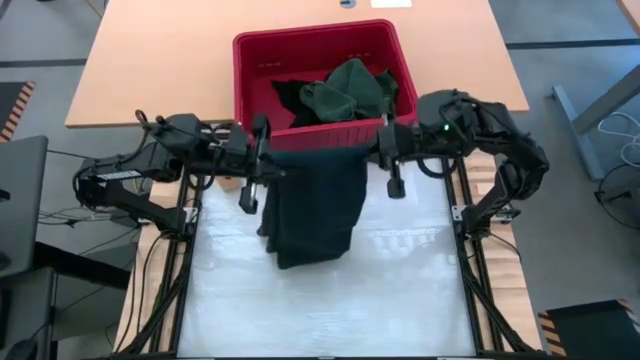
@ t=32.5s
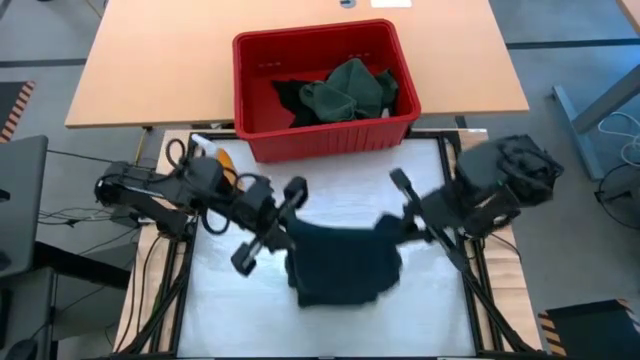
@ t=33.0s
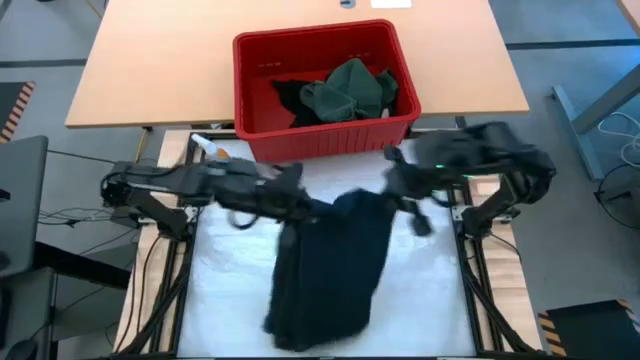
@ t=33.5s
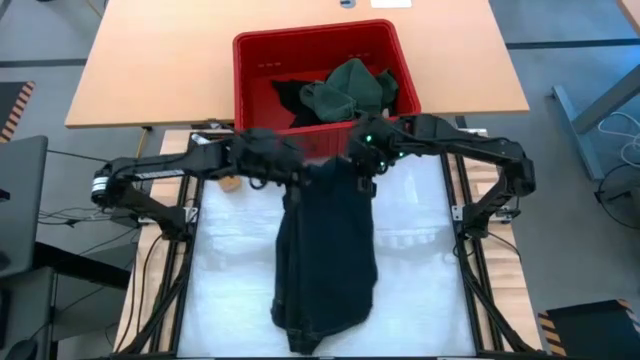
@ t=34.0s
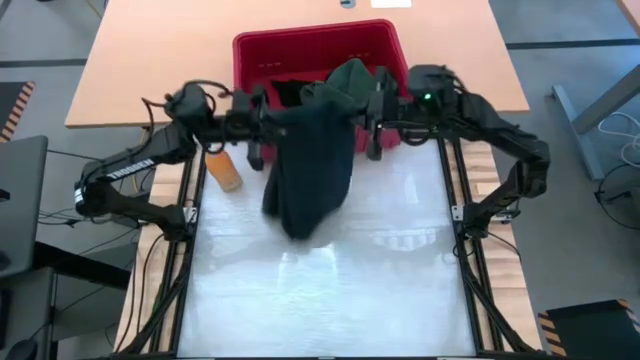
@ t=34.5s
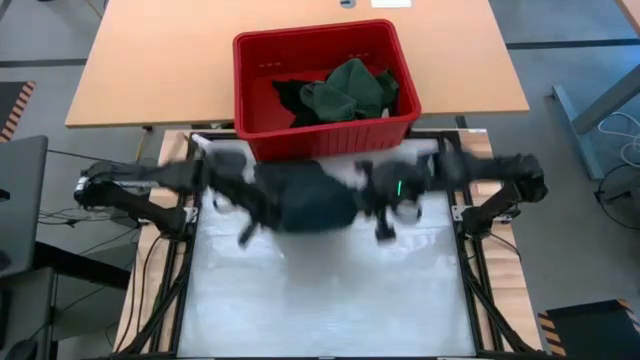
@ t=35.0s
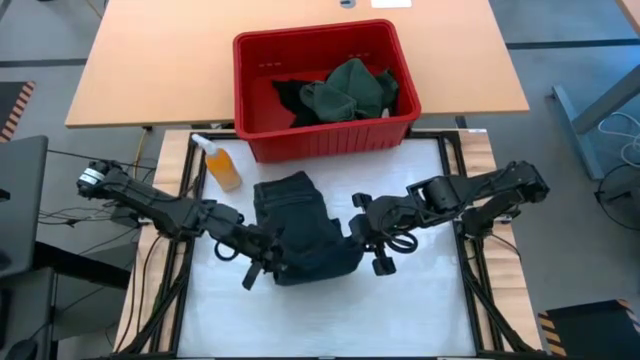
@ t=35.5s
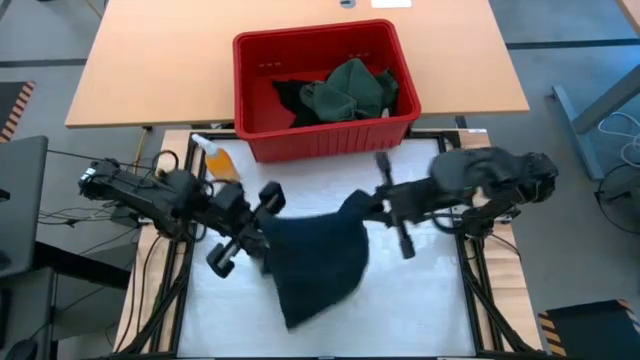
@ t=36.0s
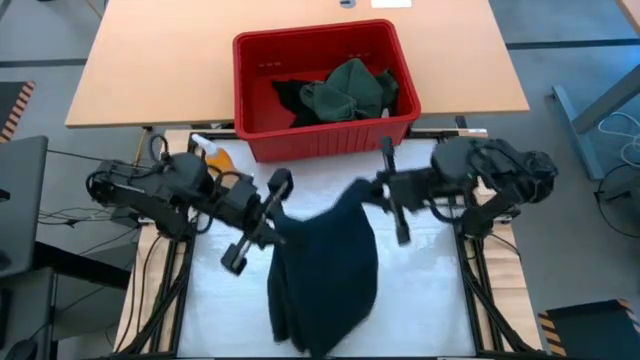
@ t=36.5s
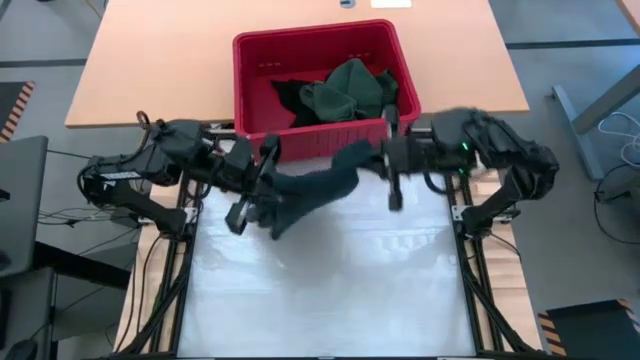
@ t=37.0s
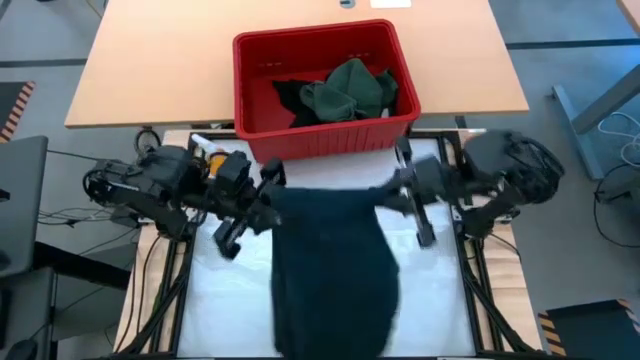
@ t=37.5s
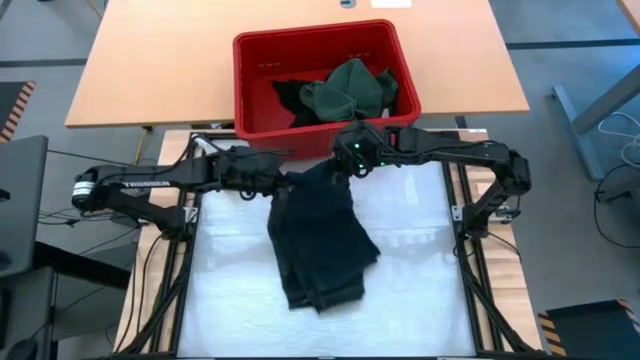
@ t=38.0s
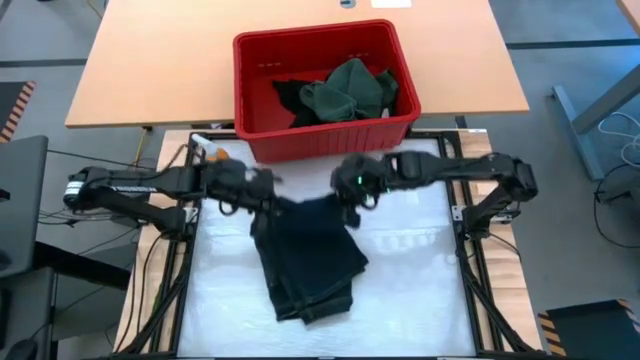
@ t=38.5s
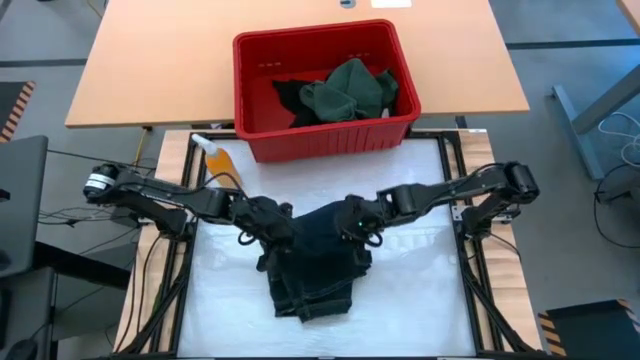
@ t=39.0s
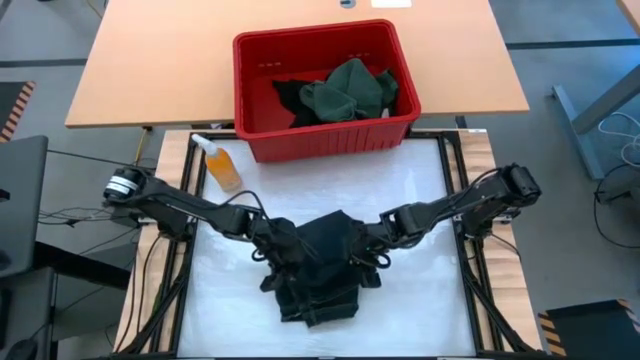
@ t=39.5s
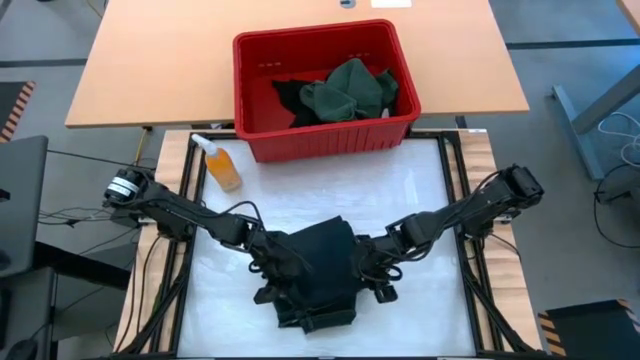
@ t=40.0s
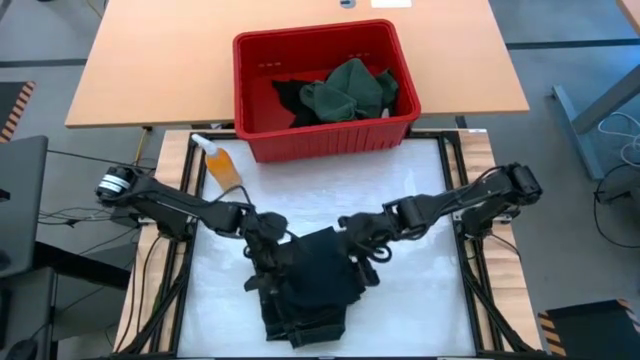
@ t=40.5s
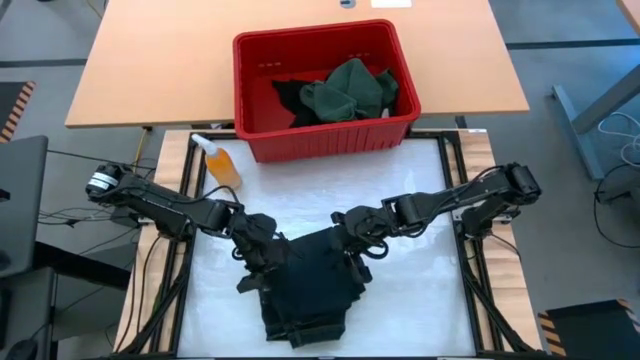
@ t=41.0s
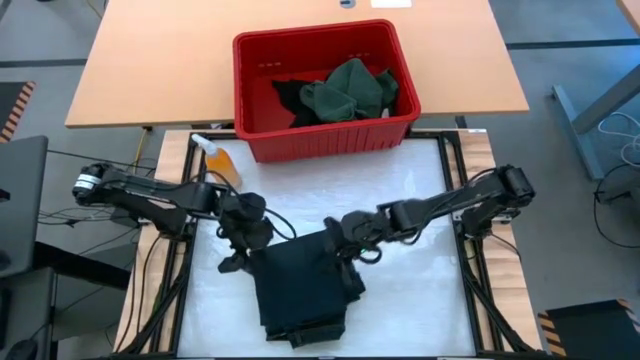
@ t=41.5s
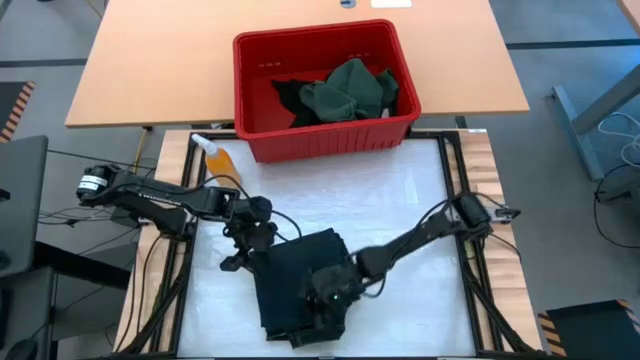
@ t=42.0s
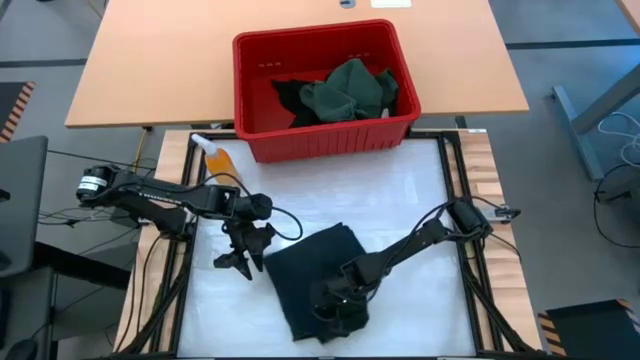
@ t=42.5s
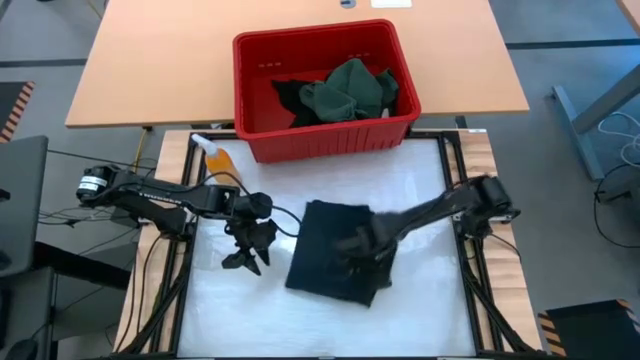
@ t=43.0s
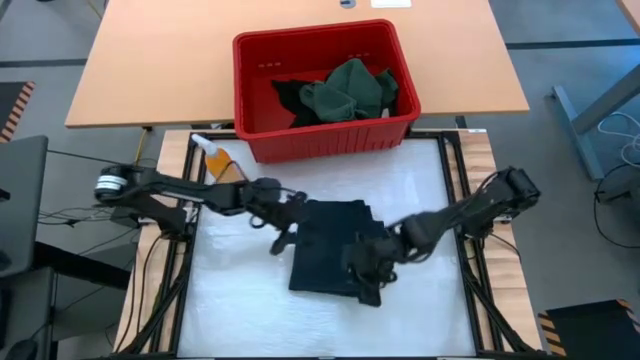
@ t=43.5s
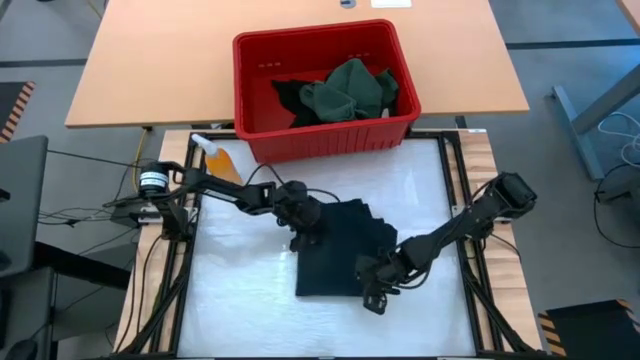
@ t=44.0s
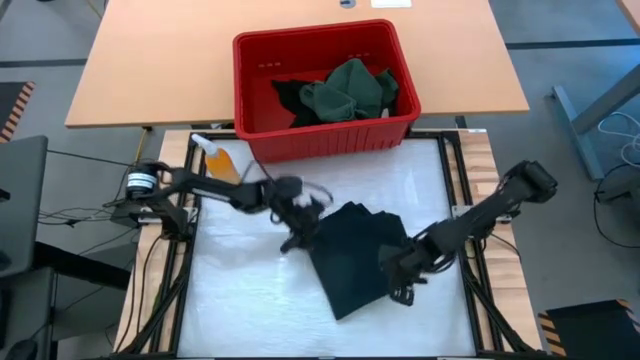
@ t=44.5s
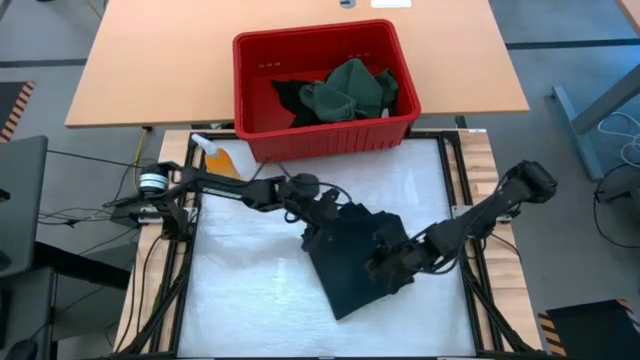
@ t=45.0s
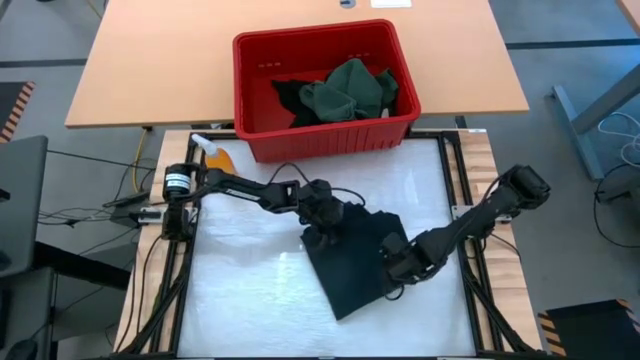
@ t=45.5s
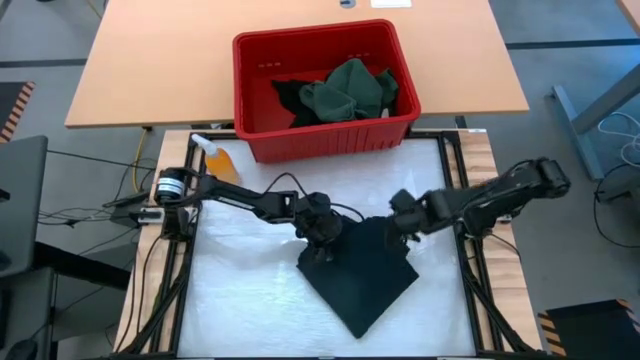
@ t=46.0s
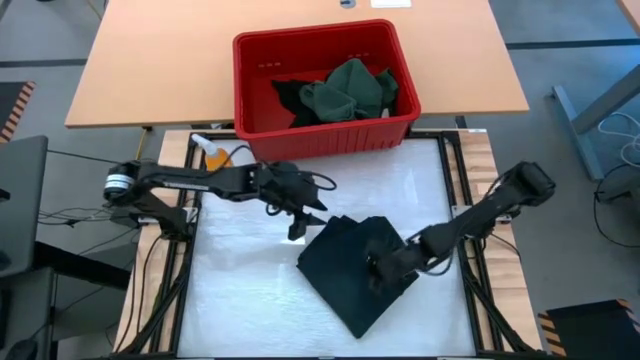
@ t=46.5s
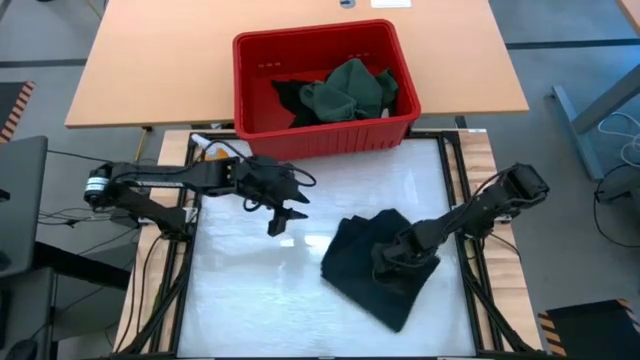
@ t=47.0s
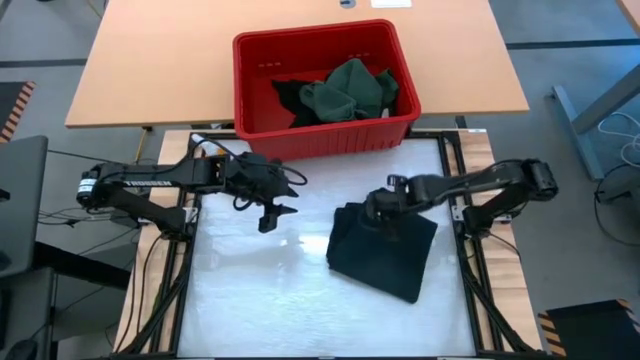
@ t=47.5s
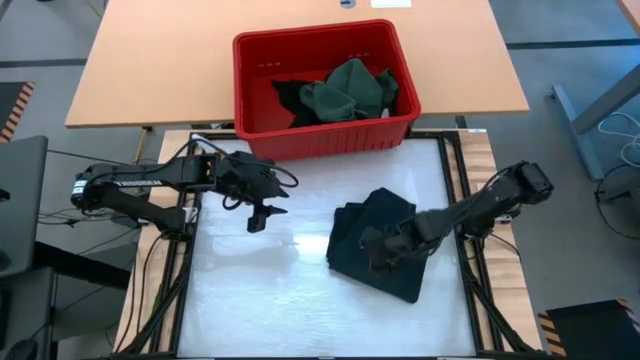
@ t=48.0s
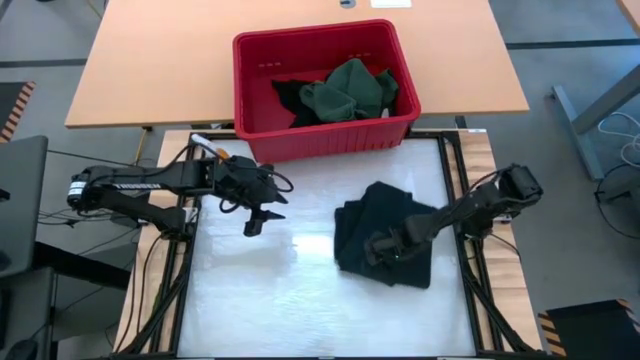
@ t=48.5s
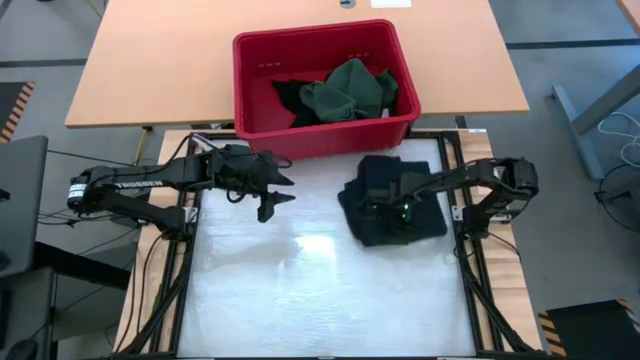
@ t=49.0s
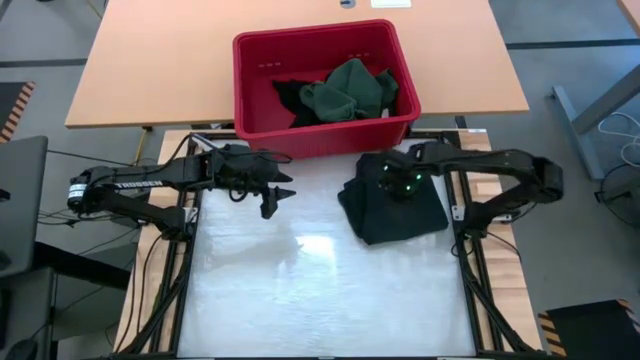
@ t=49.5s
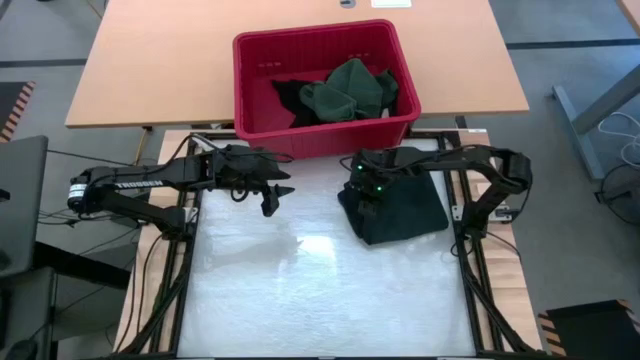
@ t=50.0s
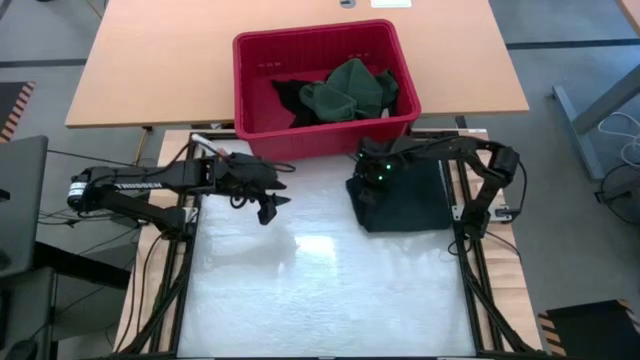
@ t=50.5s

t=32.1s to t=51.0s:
Task: Fold laundry
Fold the dark blue pants

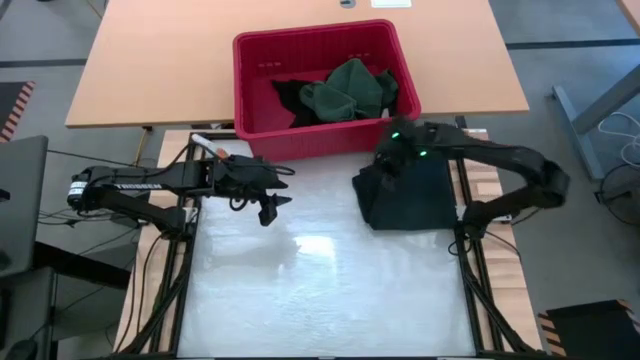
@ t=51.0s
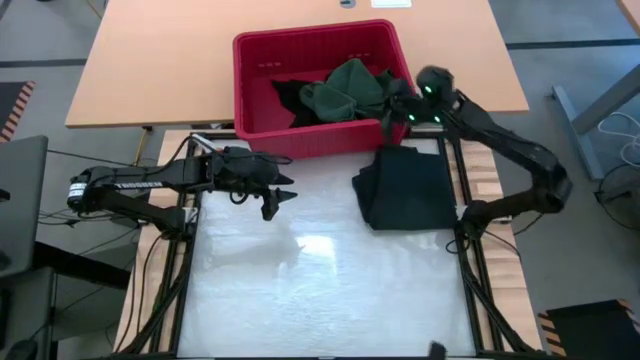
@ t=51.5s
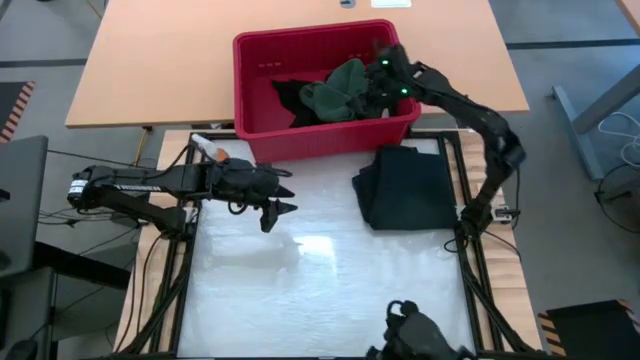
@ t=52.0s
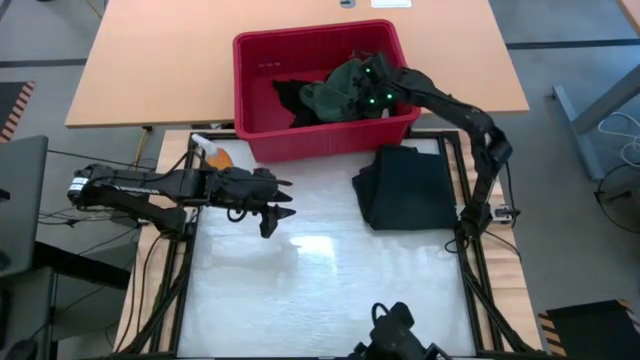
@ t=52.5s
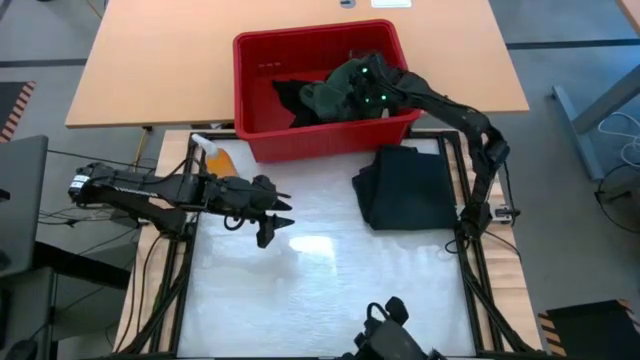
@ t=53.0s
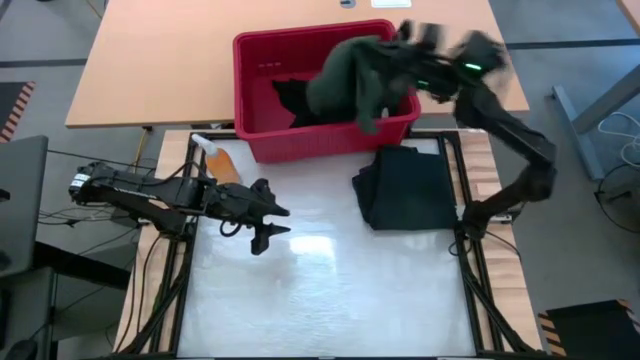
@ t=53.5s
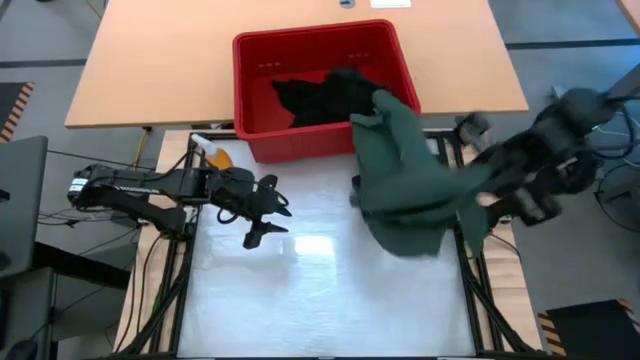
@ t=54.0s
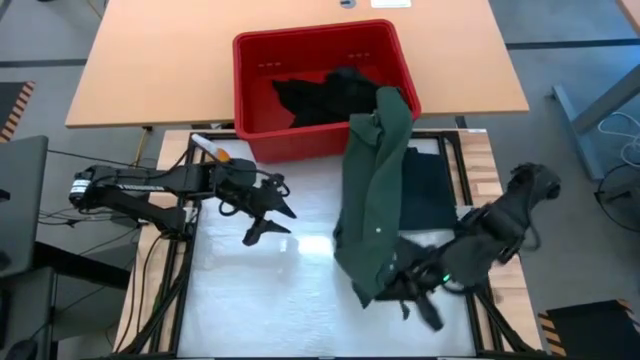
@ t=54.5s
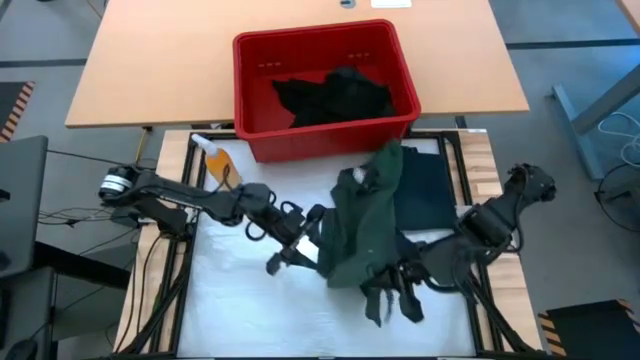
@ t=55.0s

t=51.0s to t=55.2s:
Remove the green polo shirt from the red laundry bin onto the table
